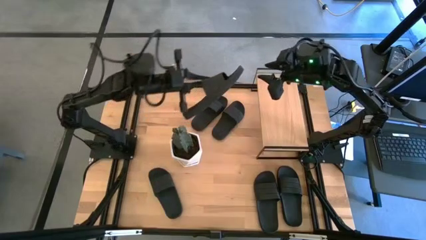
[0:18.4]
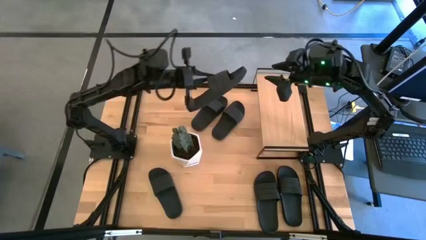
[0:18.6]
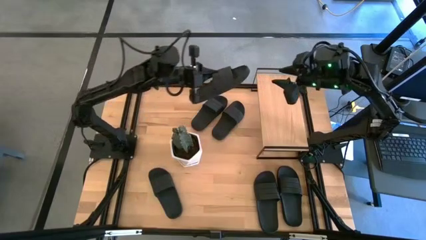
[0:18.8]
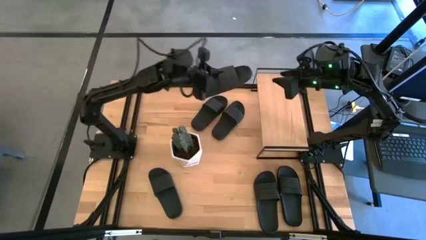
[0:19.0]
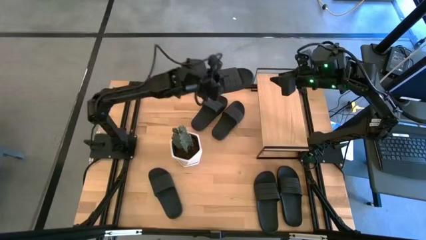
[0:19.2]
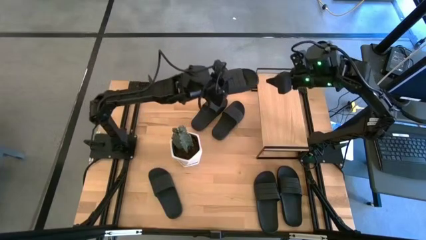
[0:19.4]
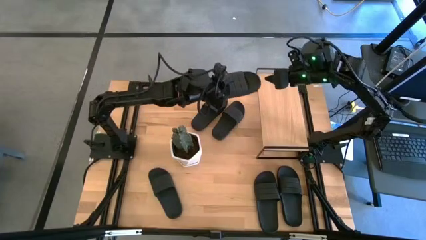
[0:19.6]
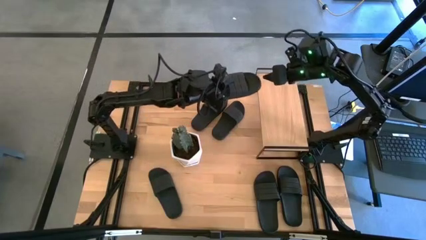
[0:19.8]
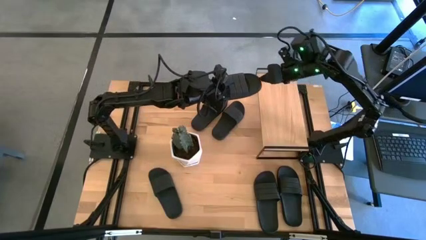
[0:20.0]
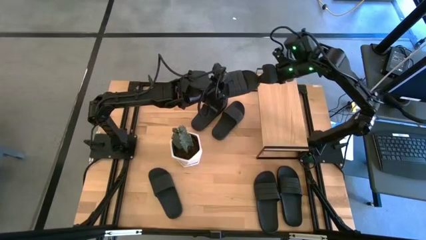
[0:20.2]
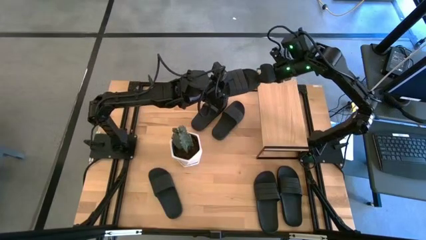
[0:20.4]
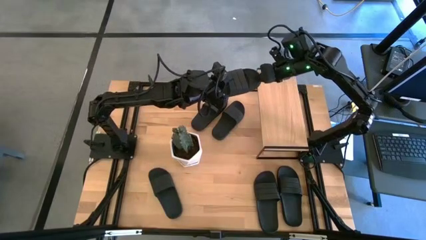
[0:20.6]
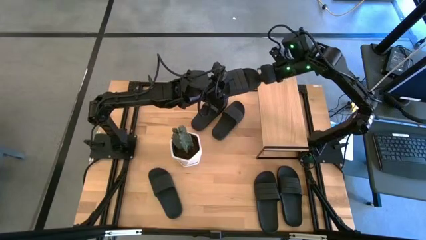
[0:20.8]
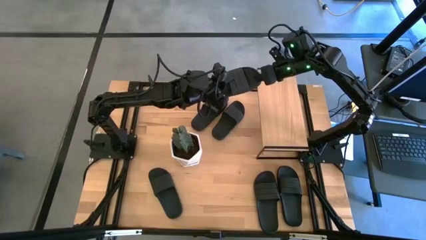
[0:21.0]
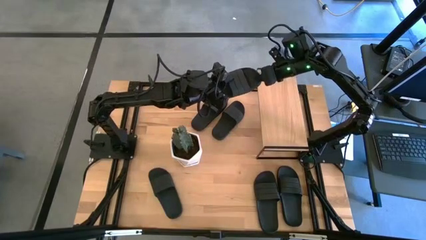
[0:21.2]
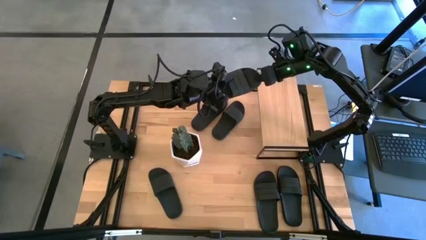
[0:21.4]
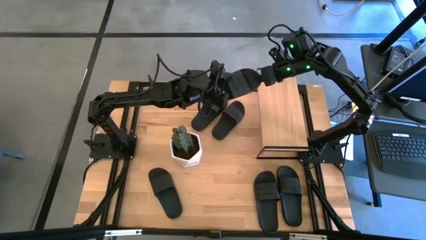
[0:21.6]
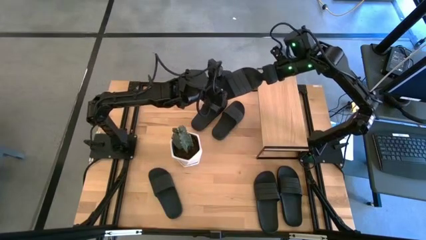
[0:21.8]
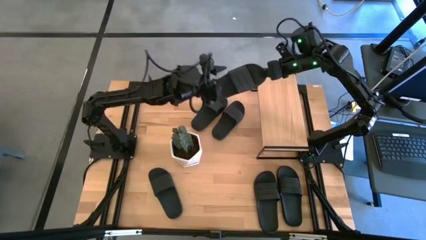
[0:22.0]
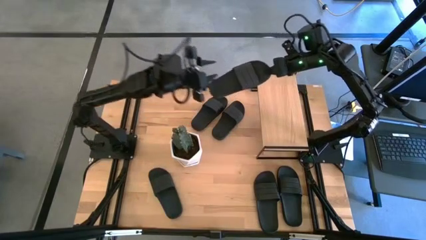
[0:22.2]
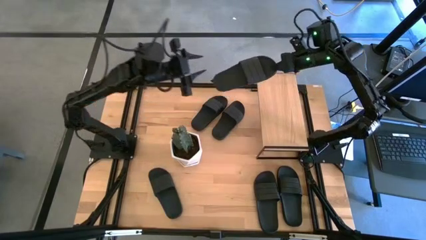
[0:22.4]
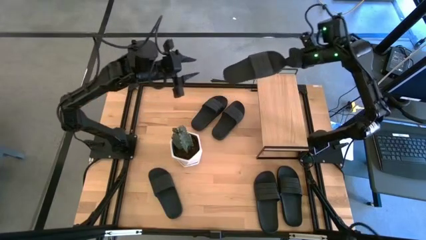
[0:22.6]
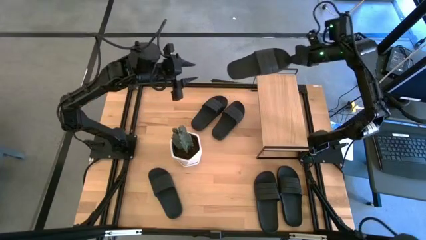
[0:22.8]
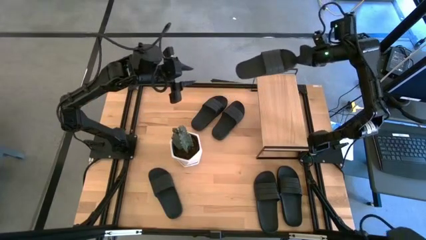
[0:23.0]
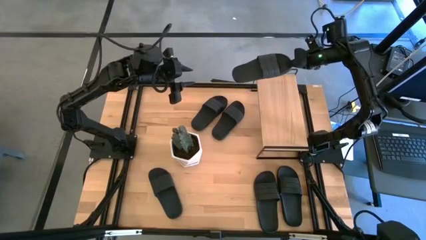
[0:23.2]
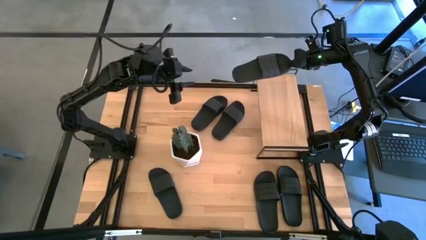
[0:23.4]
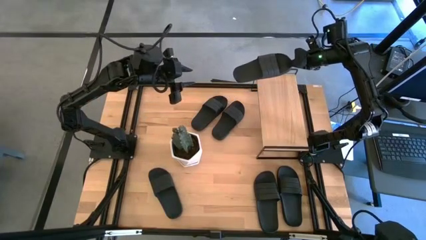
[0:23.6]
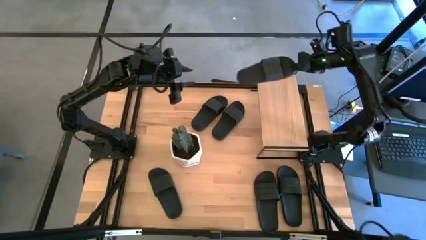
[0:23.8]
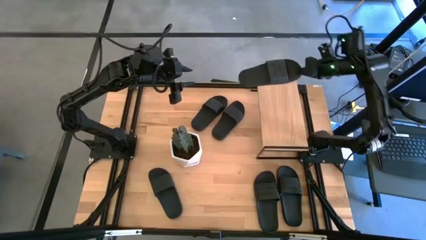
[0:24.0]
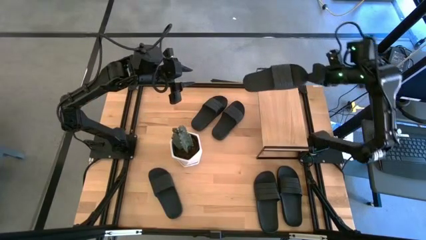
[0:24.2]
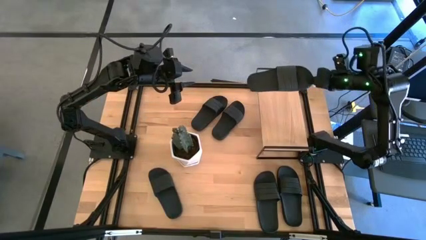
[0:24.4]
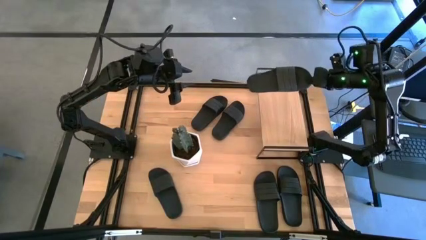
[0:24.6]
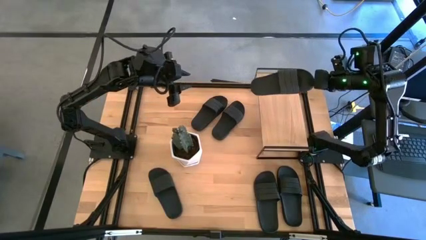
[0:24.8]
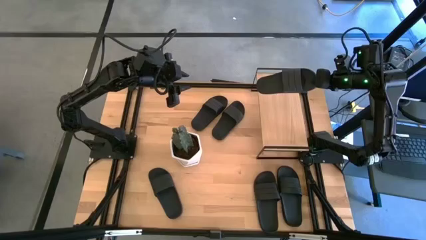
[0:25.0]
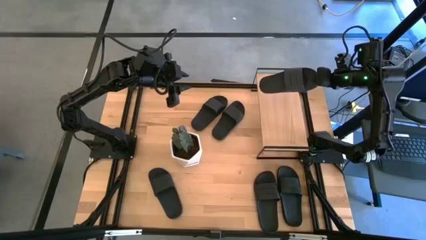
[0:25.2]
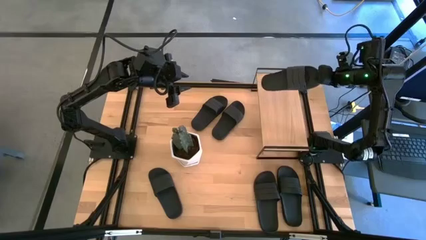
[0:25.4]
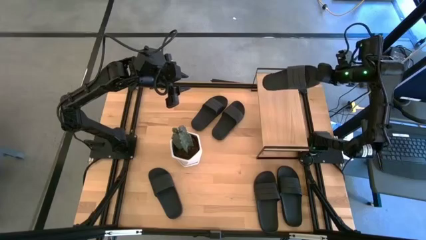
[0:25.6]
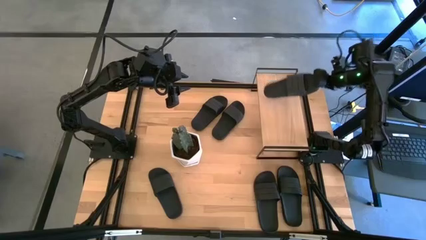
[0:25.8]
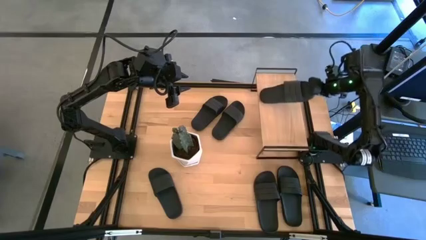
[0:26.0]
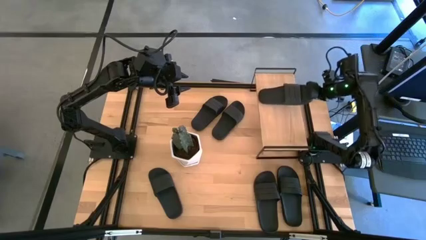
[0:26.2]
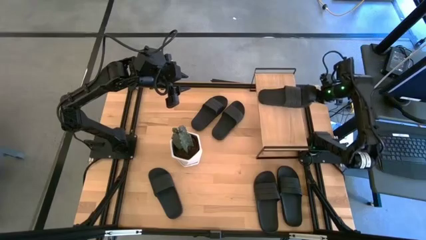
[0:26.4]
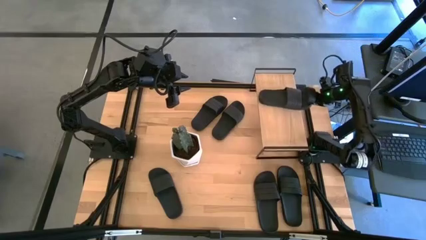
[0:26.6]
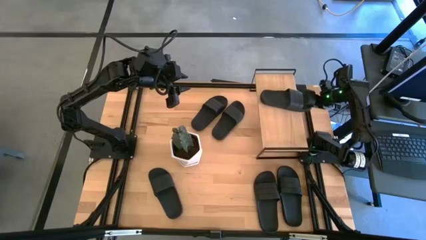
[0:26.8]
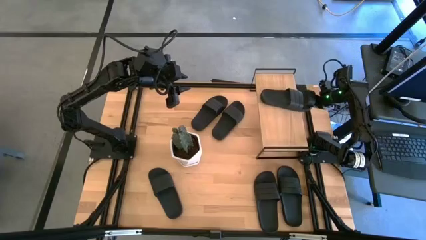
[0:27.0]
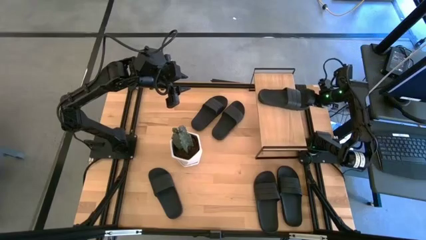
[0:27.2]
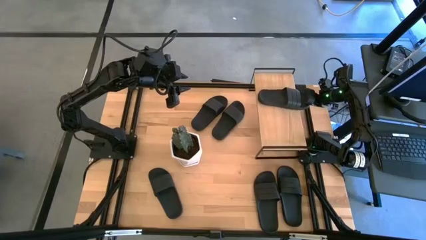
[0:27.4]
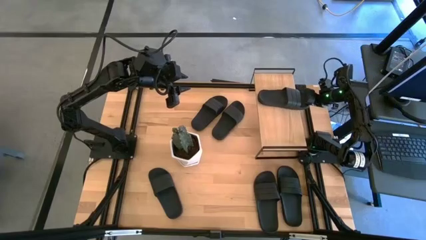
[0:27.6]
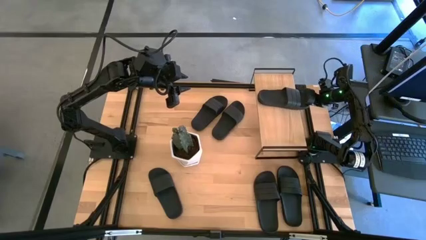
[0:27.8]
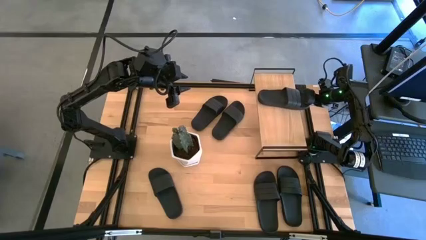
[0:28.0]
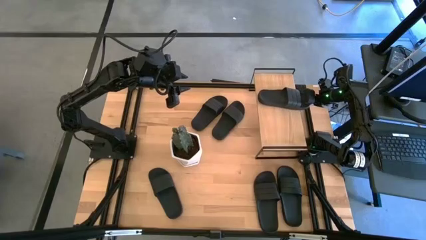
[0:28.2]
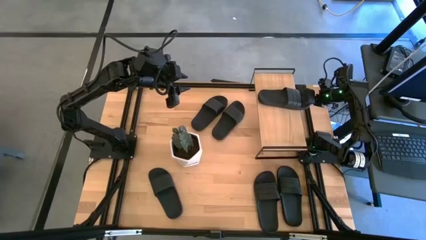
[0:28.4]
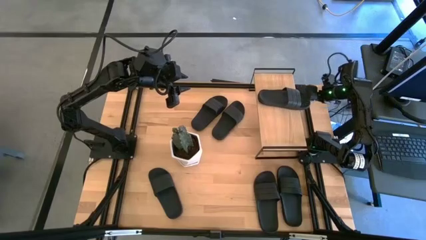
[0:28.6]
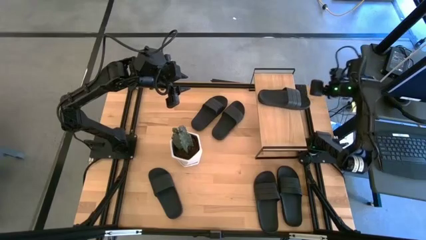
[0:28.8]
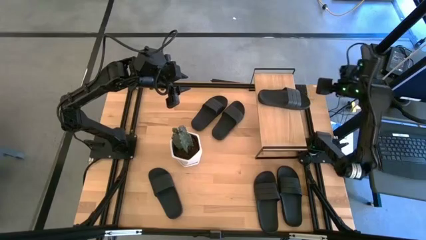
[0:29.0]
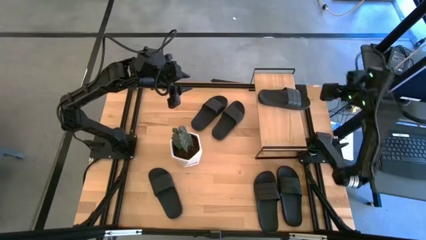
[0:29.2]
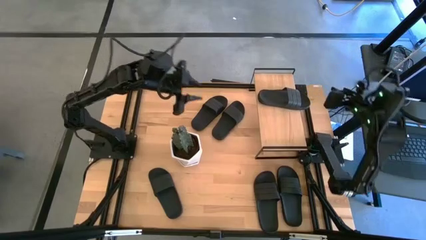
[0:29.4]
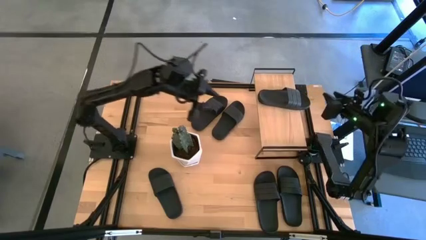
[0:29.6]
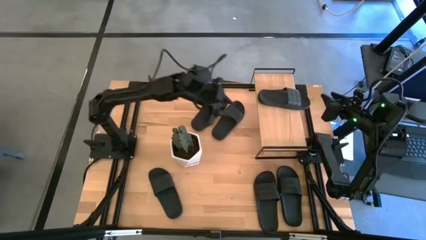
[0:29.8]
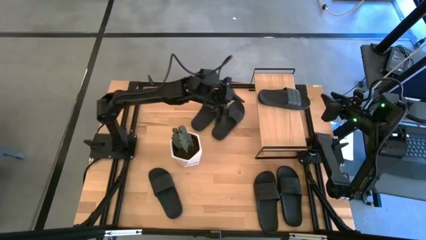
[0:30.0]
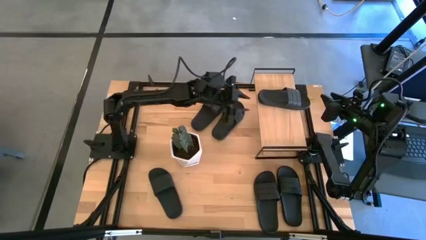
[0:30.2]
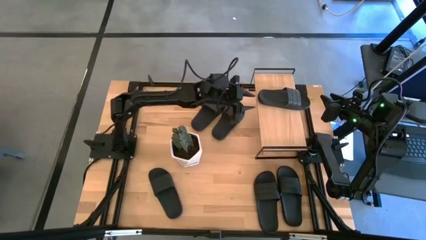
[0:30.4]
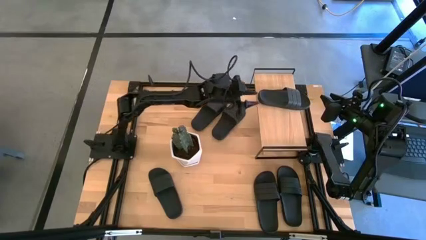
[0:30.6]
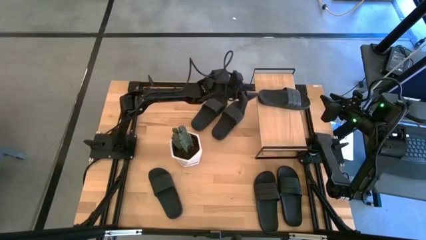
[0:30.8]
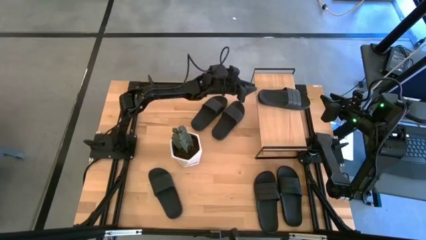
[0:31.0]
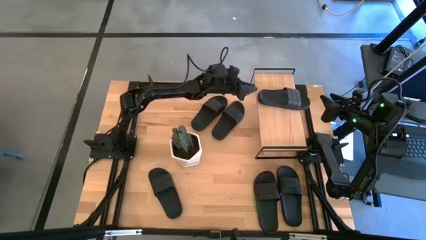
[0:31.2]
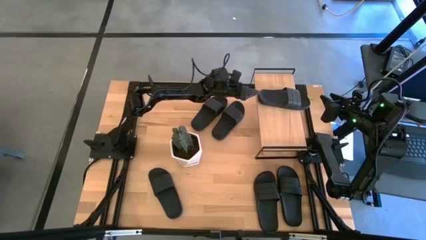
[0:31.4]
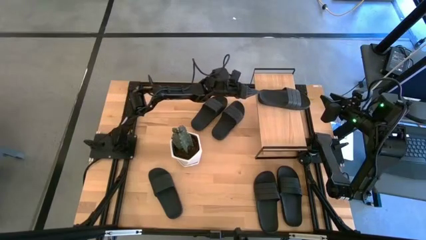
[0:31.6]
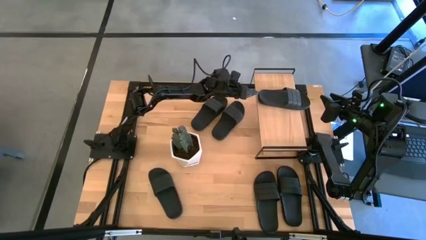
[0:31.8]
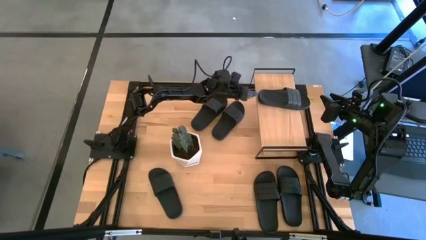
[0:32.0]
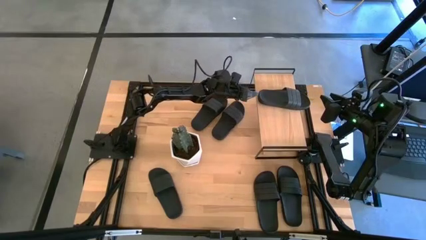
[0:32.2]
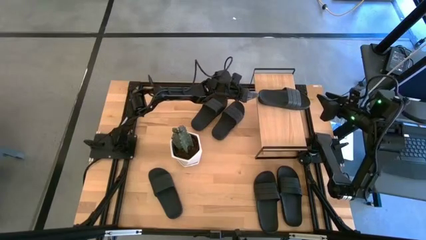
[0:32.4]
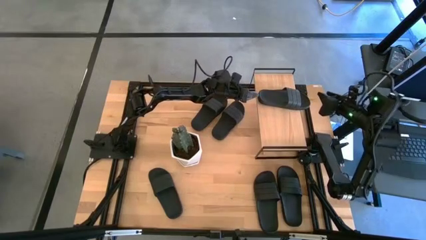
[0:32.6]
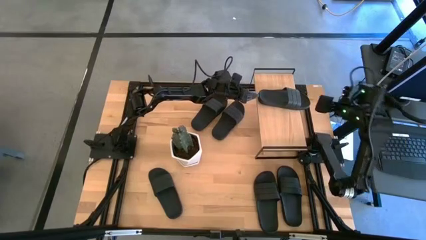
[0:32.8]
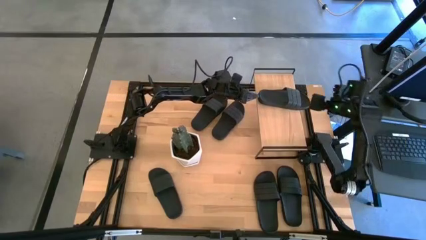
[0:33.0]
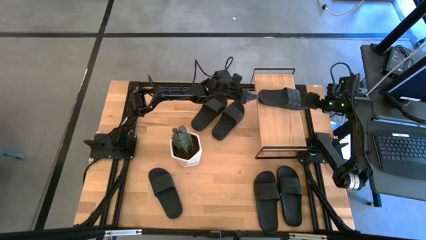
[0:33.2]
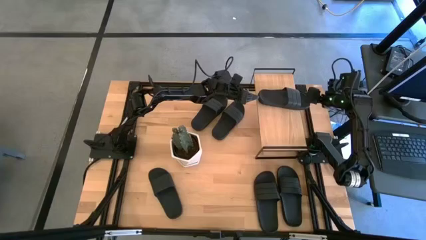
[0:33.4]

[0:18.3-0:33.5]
Task: Pick and place slides into the shelf
Put the black slide on the shelf
